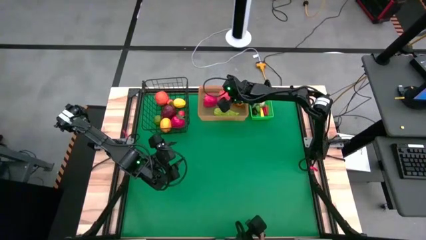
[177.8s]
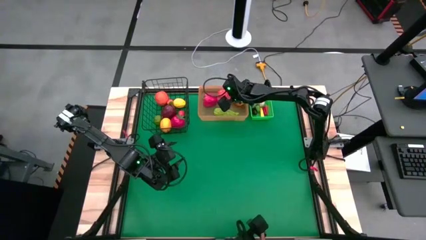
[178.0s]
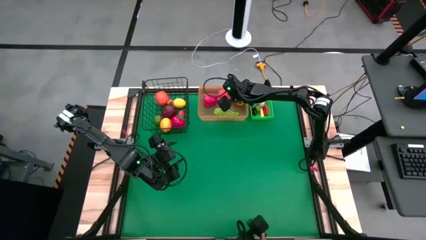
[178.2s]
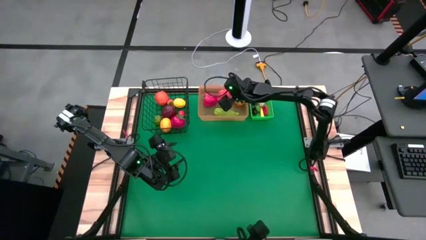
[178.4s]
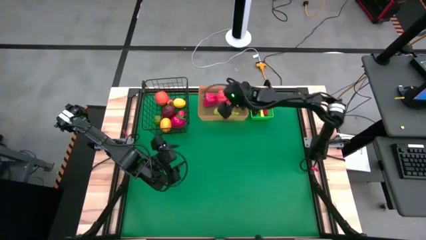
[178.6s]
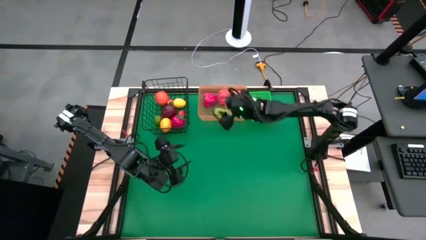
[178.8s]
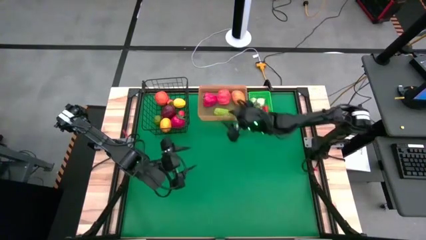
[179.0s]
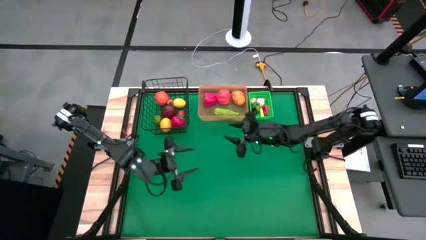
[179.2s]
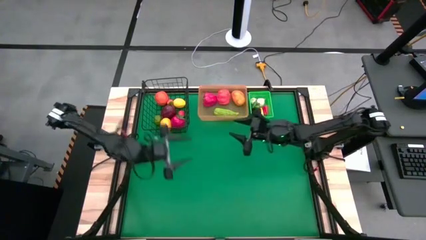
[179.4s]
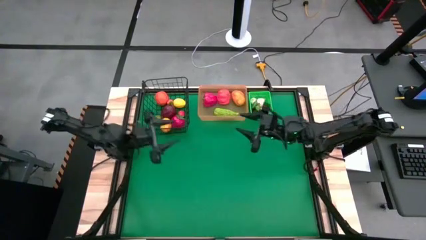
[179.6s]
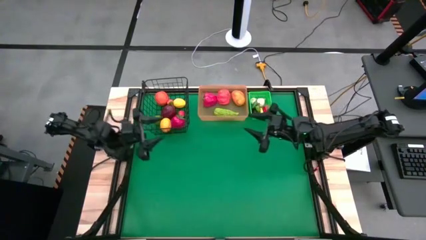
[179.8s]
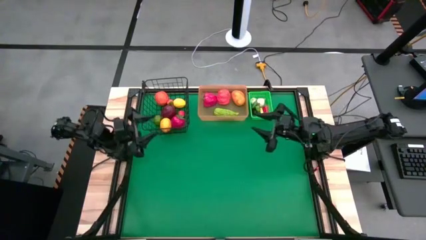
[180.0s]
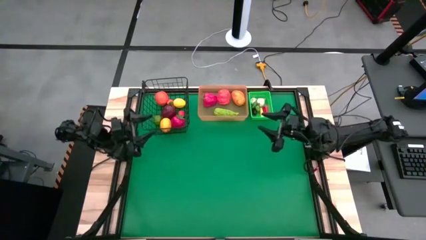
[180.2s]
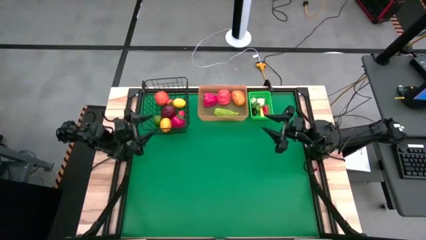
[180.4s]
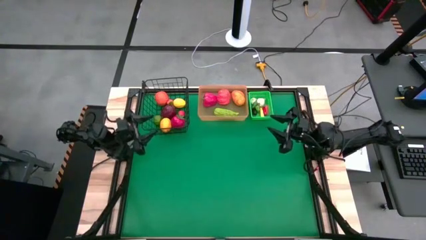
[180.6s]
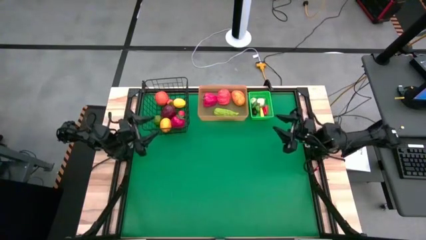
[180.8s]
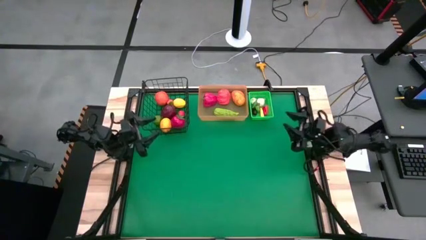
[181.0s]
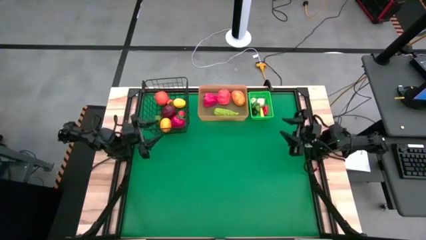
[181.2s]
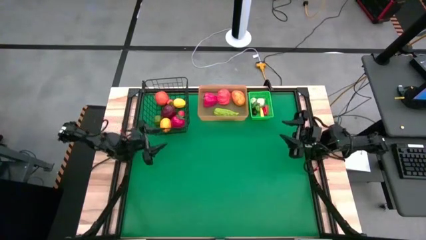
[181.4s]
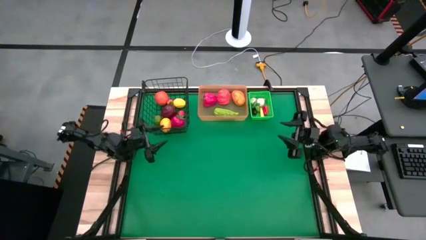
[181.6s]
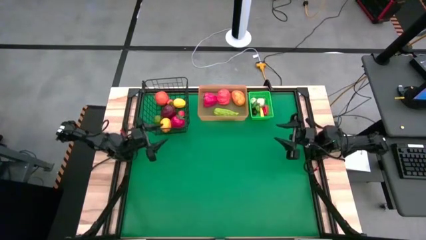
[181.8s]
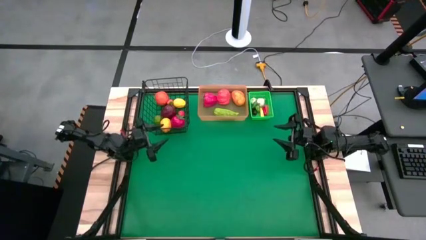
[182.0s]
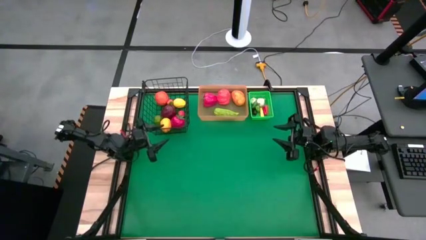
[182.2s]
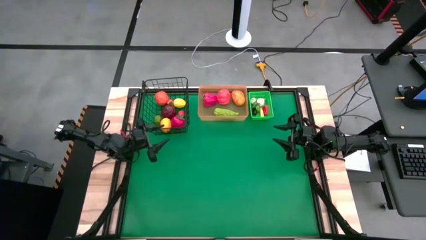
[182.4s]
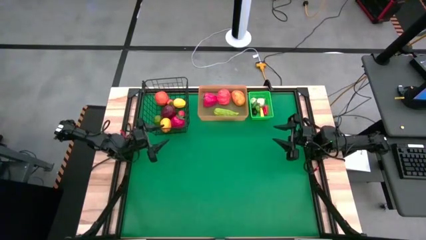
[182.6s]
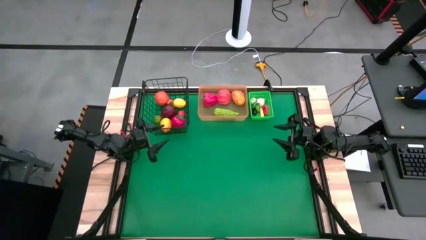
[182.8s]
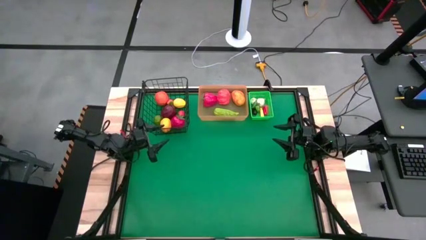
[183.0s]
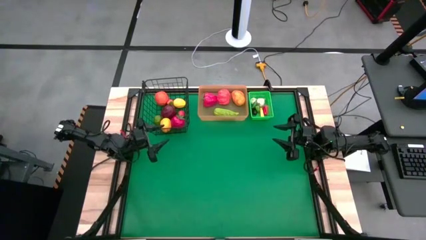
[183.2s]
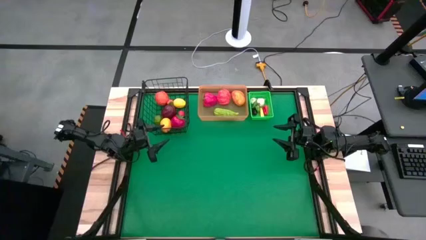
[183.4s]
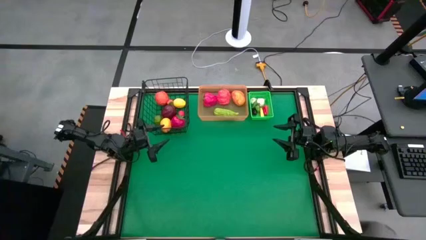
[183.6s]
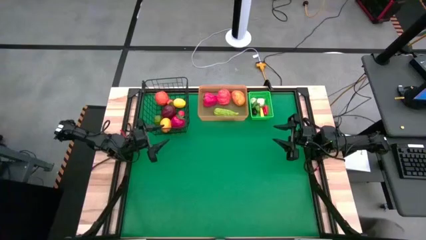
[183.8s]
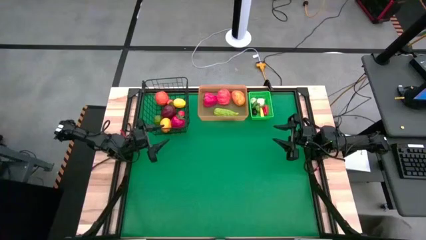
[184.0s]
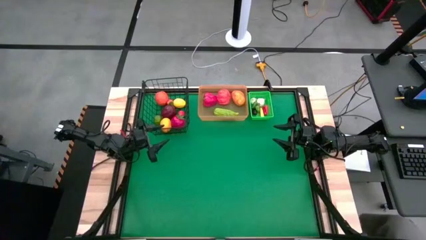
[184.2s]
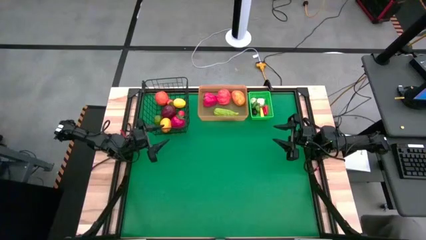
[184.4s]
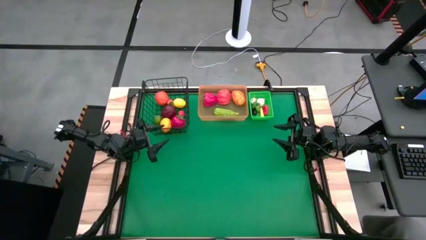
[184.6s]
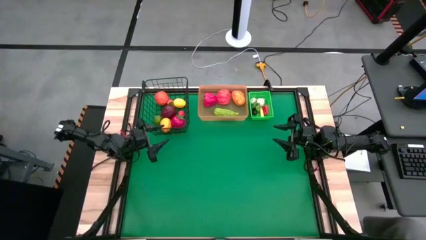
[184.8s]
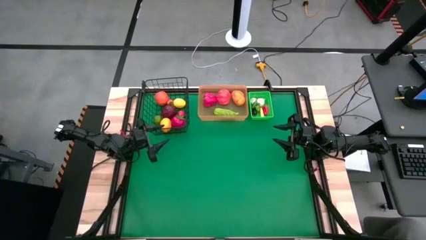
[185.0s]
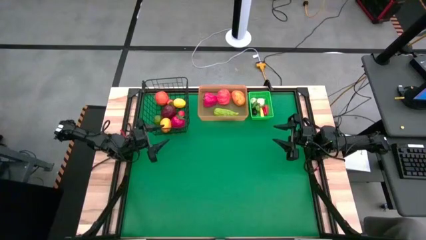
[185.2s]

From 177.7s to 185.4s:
Task: Sort produce into baskets
Return to Home Position

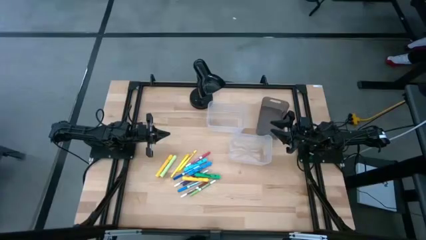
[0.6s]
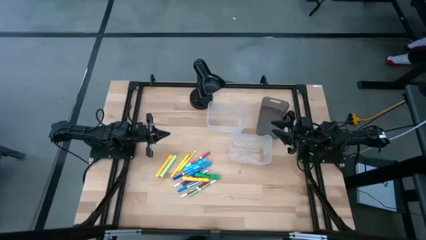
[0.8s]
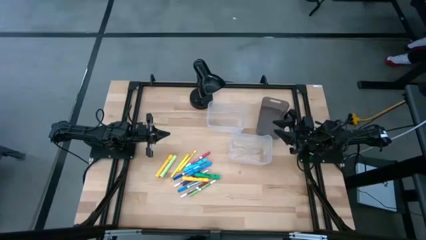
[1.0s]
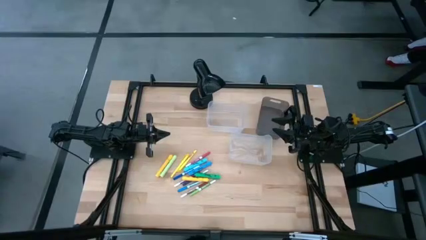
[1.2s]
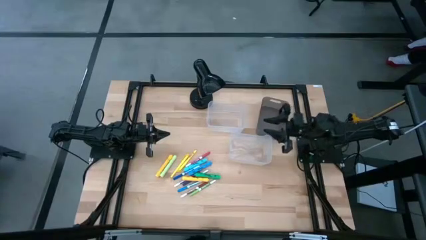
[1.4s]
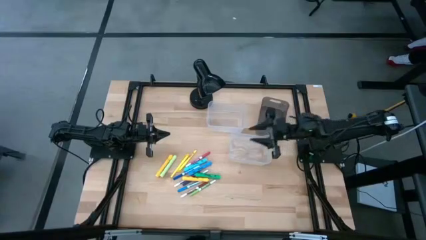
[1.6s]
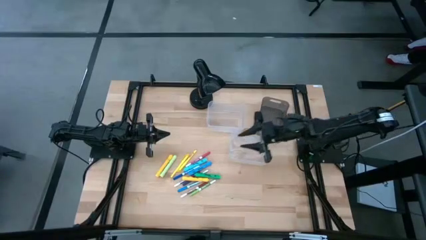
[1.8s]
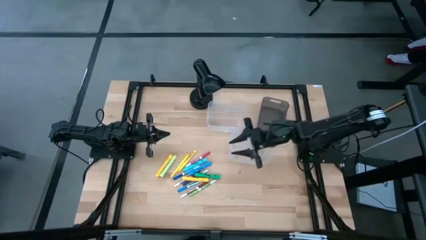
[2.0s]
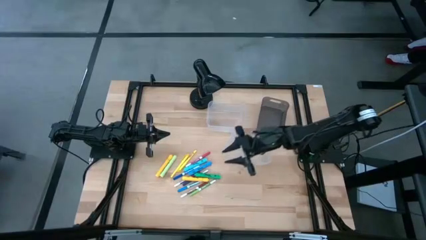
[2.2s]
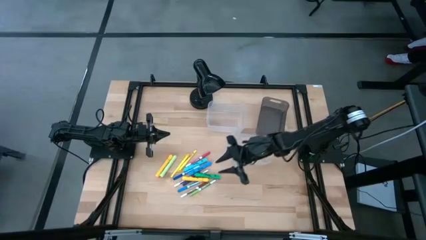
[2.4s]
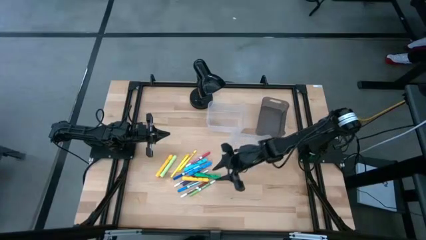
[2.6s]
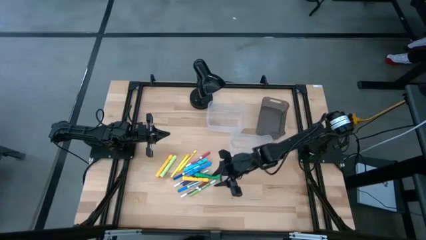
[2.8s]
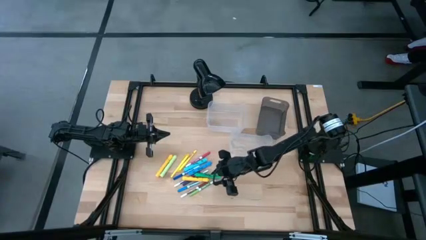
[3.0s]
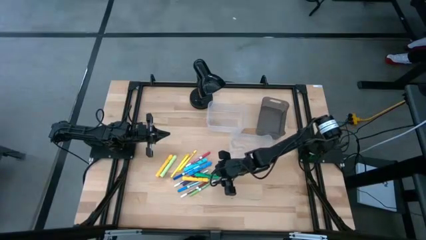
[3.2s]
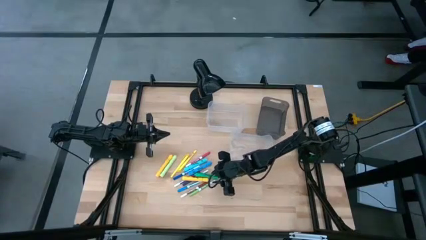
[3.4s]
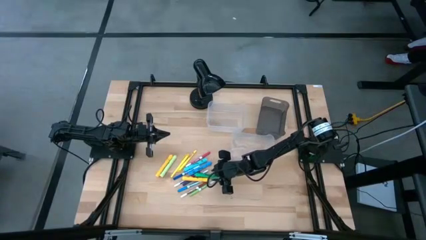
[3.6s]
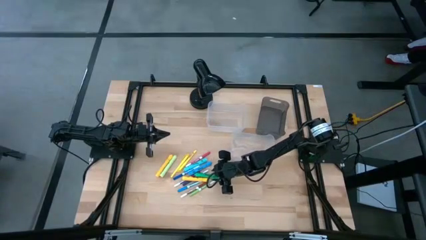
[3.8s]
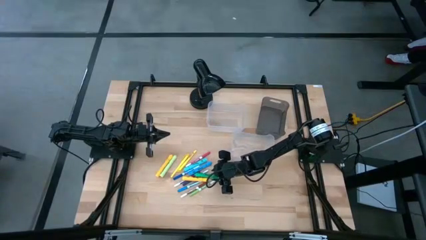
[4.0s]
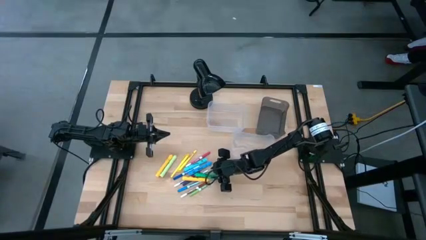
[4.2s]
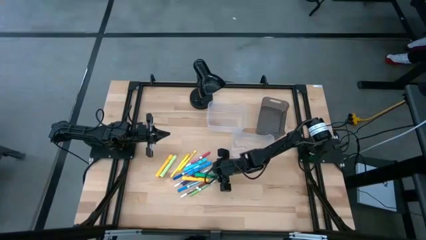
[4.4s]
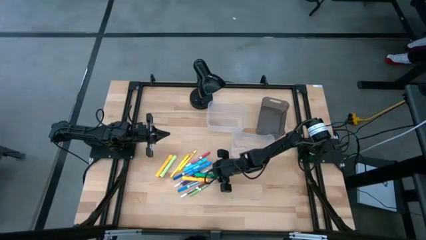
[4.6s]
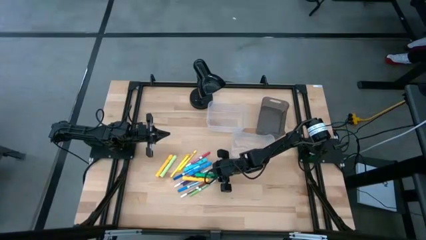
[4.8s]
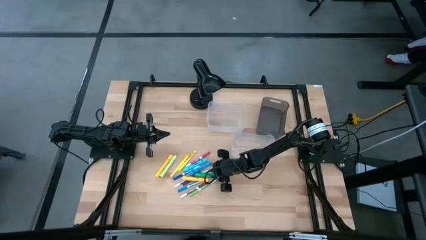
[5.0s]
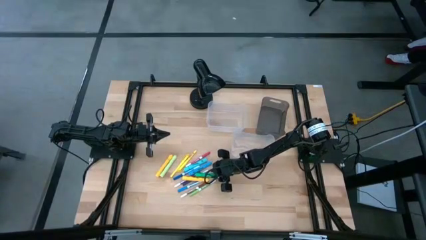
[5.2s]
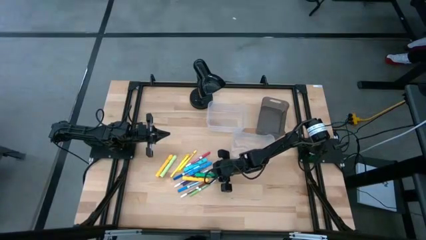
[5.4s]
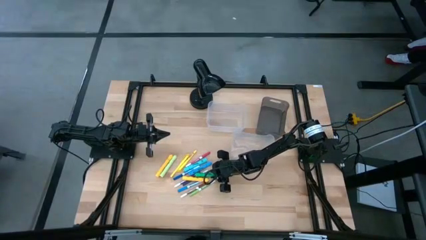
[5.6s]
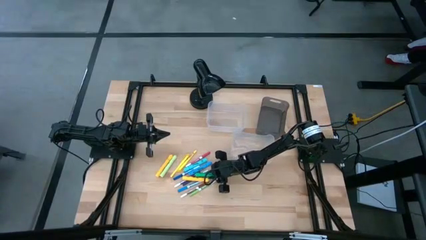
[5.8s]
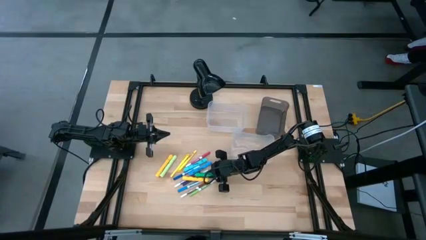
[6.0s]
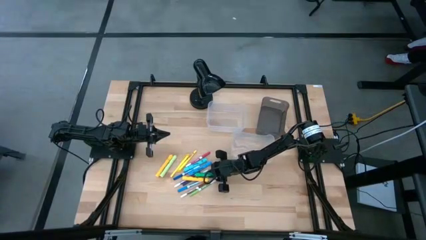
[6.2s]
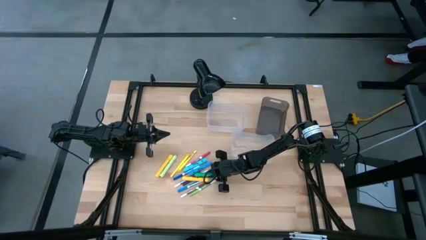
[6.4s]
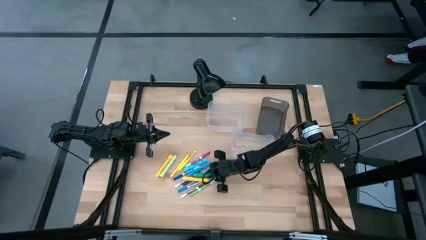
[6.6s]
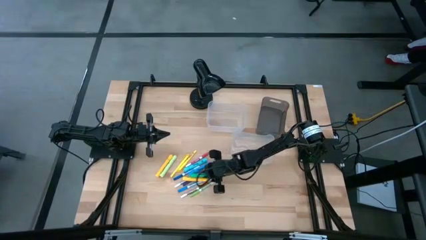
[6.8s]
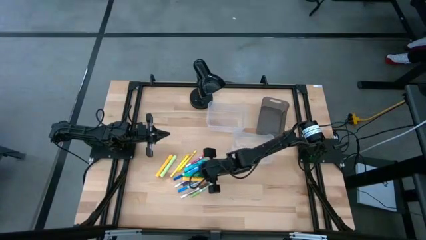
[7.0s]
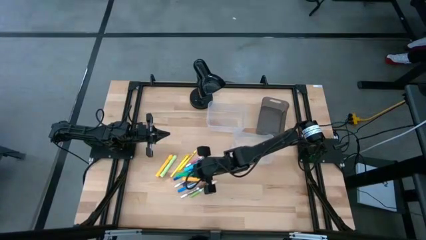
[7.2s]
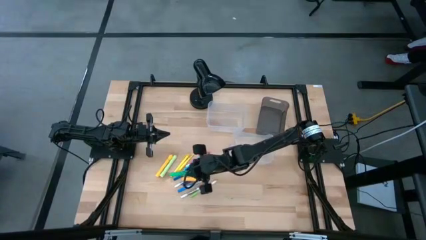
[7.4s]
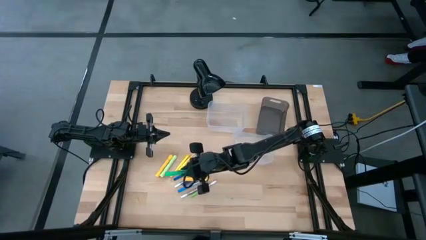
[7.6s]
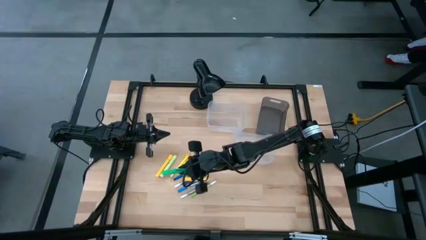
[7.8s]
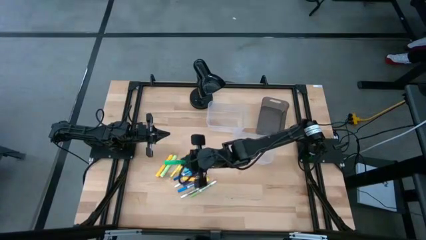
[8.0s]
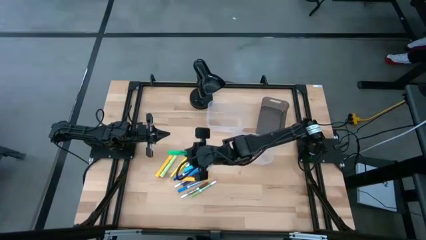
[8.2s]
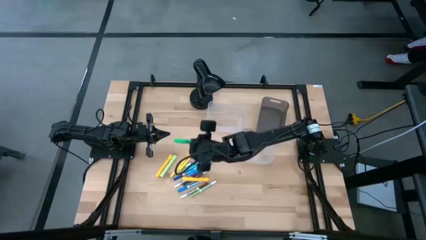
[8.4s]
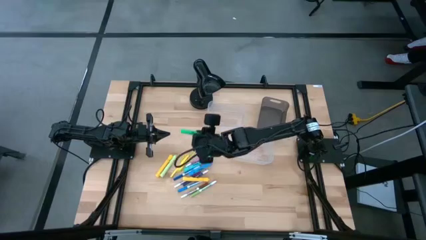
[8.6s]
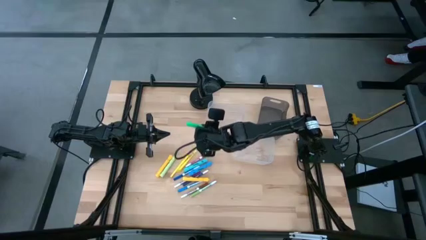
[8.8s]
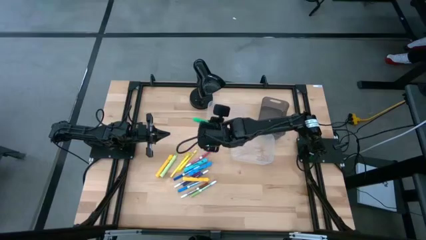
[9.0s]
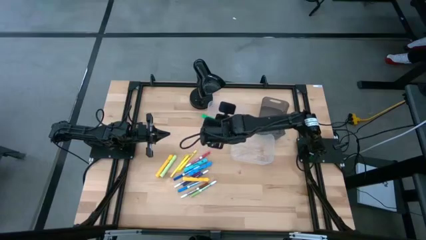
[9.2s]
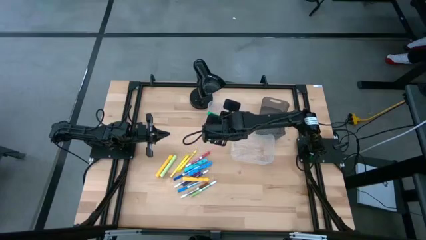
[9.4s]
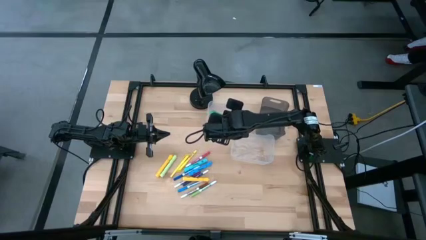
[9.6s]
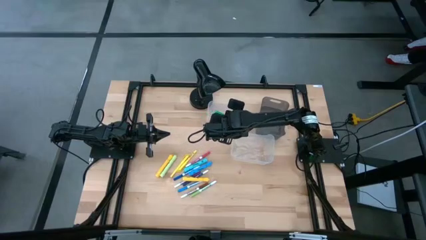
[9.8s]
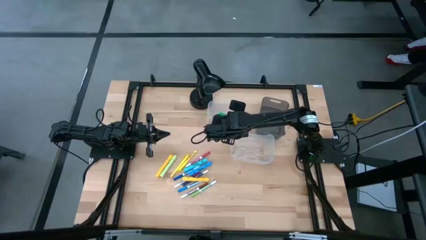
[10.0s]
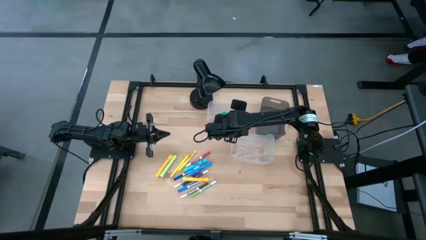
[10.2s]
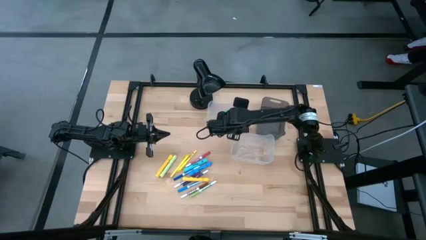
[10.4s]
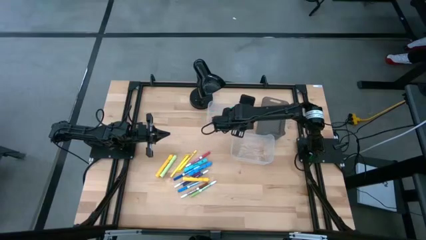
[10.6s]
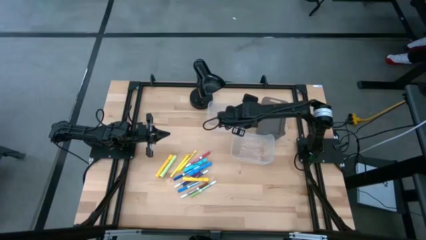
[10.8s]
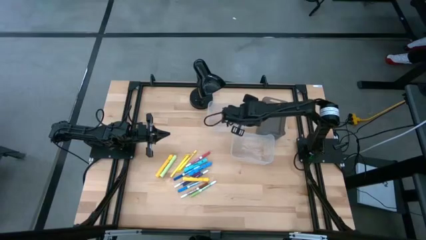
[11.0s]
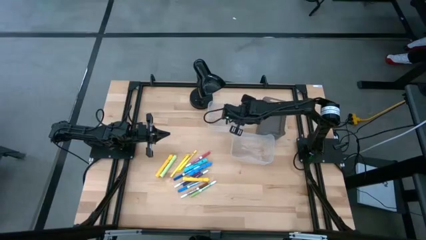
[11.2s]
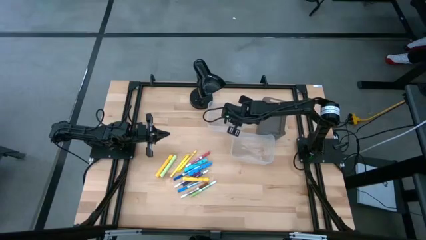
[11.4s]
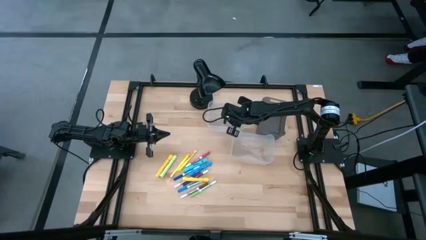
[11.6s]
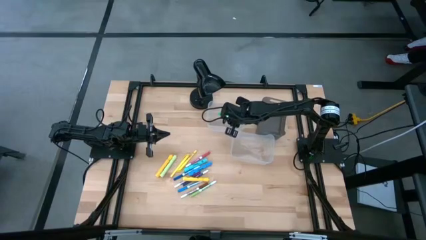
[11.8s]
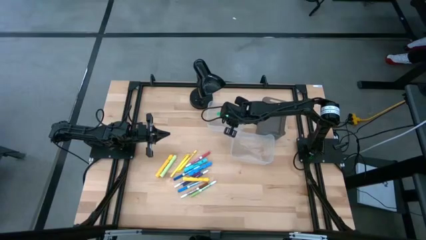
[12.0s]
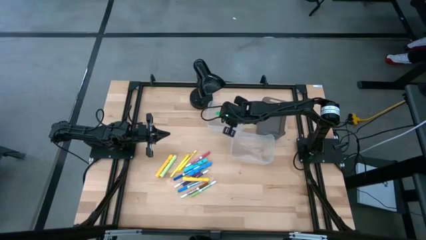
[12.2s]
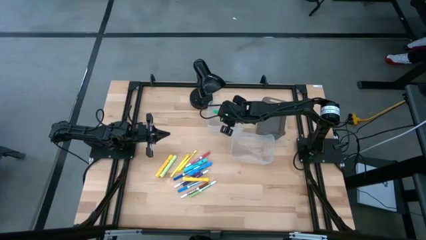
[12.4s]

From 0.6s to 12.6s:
Task: Pick & Place Markers
Put the green highlighter pen into the top transparent bin
